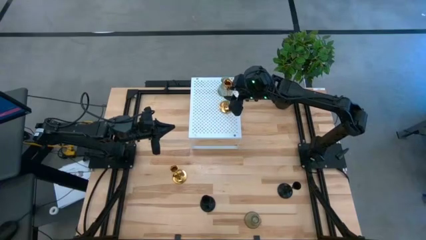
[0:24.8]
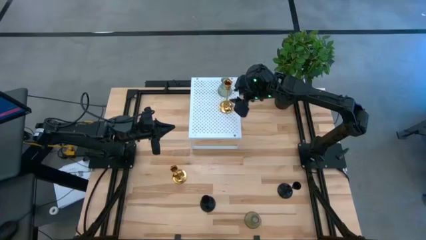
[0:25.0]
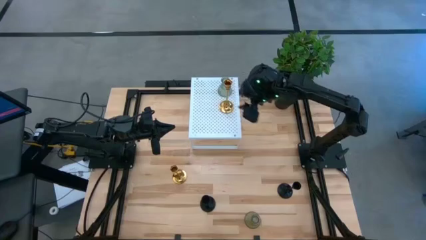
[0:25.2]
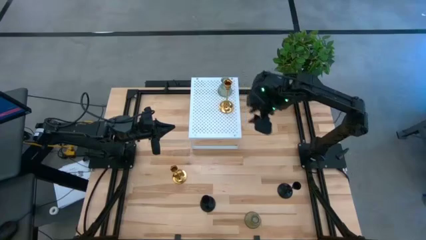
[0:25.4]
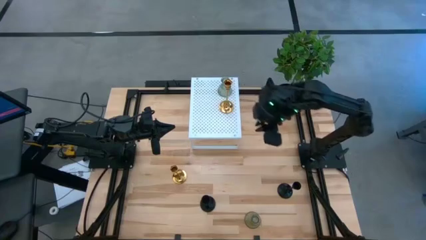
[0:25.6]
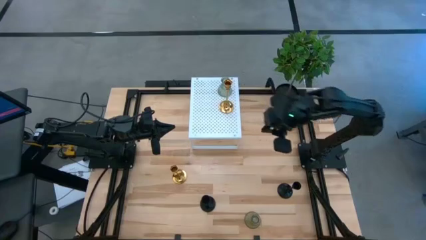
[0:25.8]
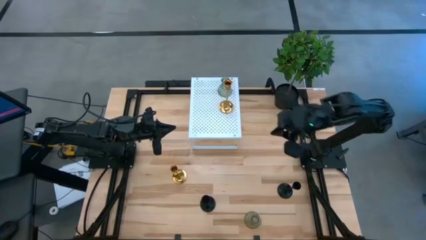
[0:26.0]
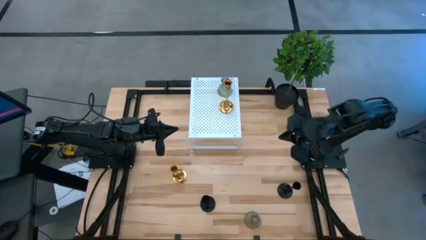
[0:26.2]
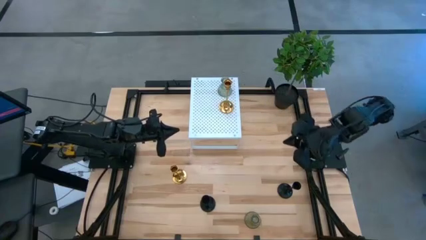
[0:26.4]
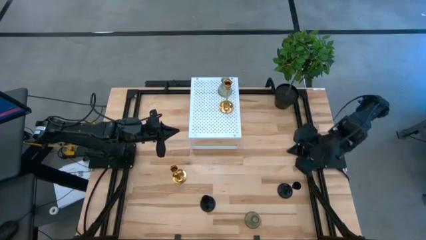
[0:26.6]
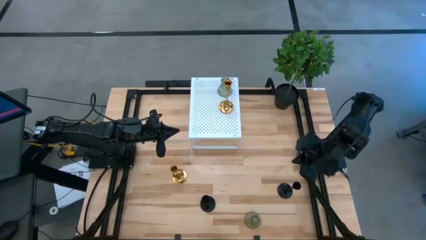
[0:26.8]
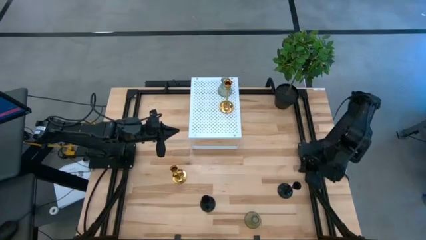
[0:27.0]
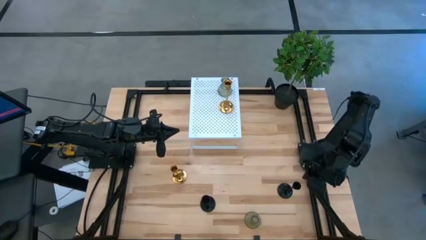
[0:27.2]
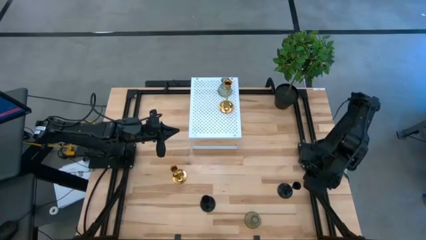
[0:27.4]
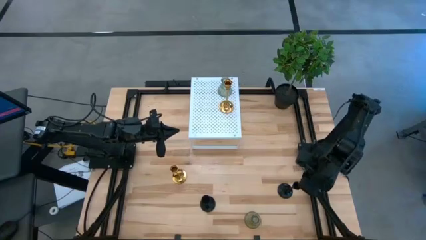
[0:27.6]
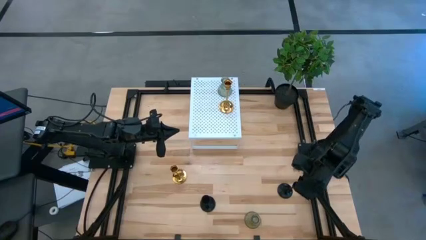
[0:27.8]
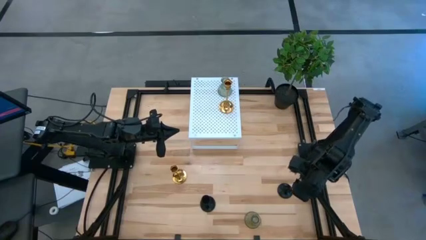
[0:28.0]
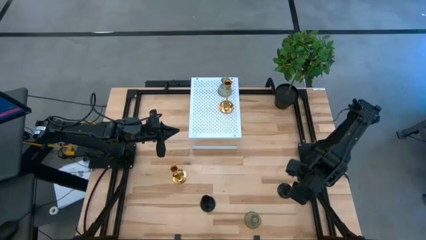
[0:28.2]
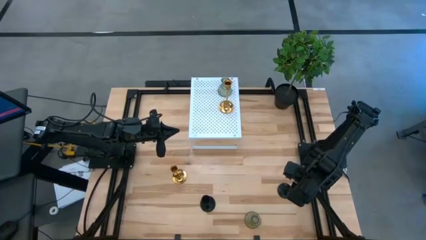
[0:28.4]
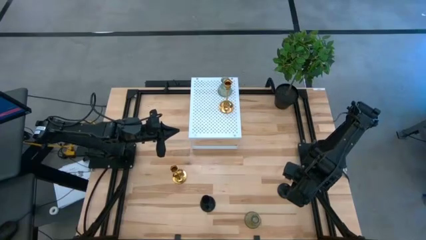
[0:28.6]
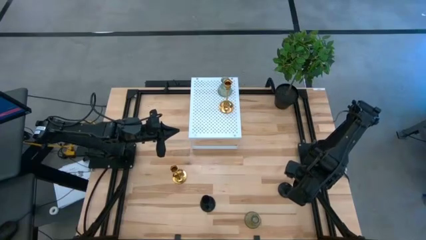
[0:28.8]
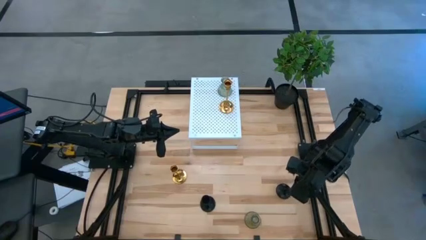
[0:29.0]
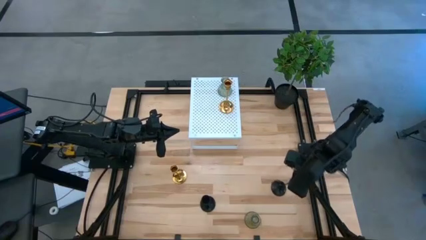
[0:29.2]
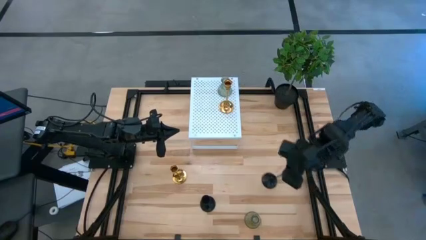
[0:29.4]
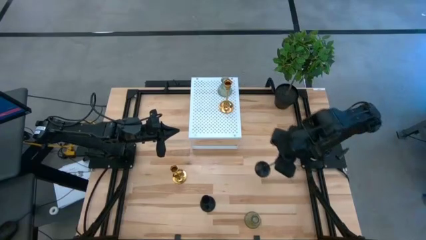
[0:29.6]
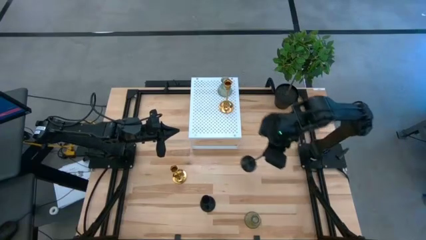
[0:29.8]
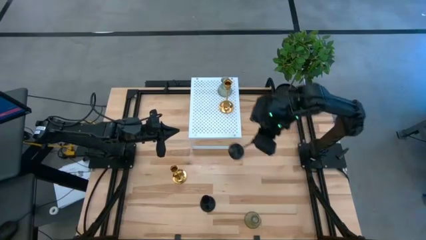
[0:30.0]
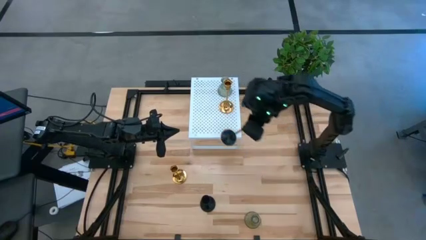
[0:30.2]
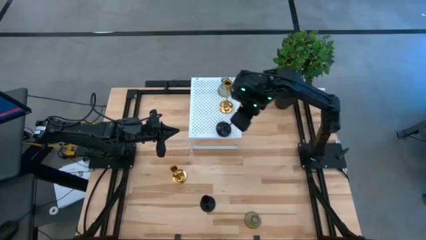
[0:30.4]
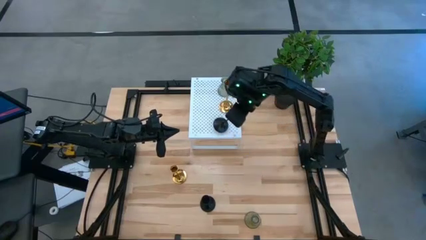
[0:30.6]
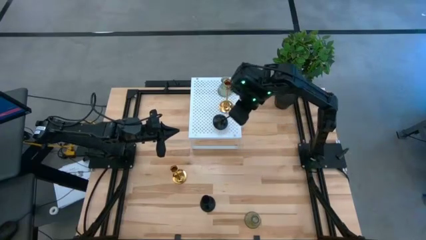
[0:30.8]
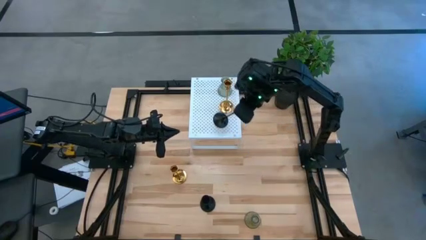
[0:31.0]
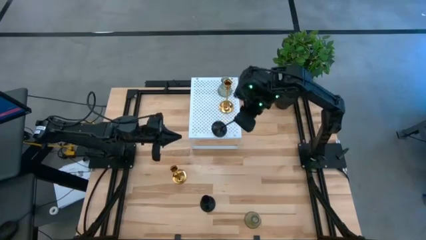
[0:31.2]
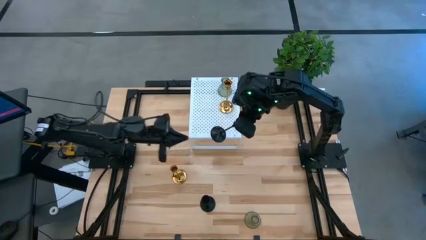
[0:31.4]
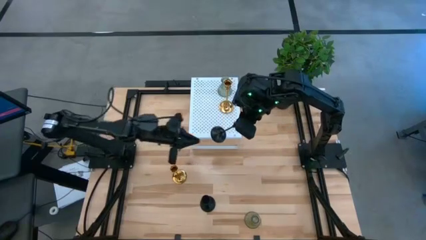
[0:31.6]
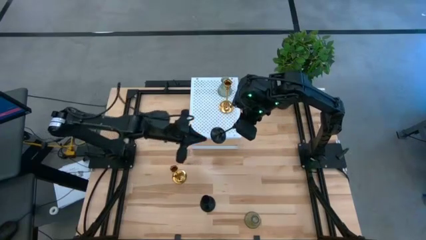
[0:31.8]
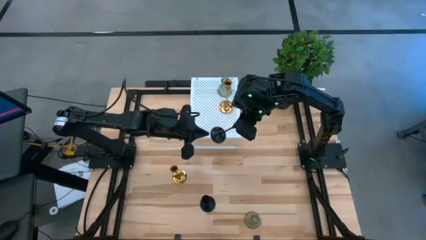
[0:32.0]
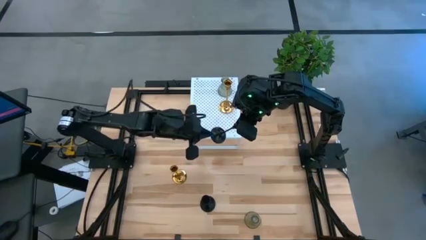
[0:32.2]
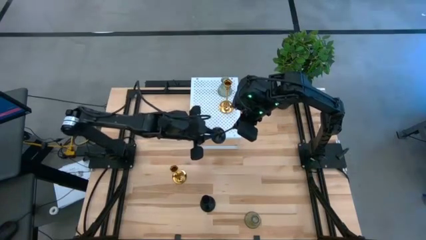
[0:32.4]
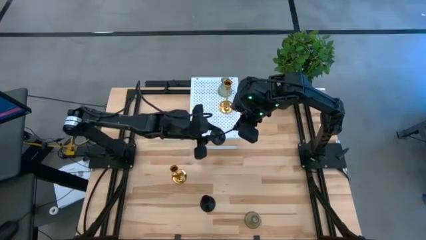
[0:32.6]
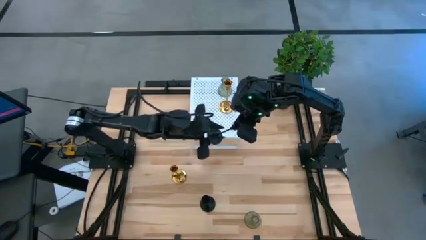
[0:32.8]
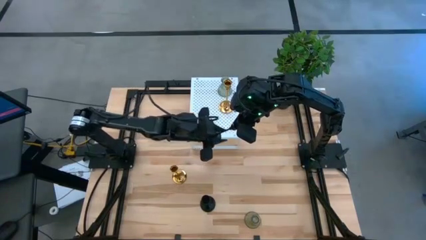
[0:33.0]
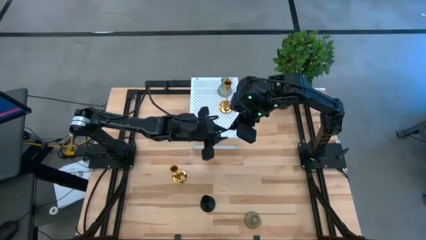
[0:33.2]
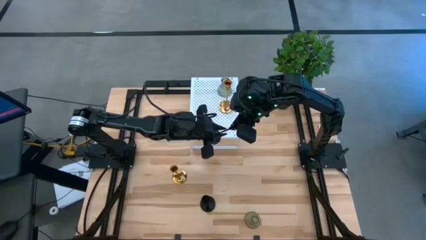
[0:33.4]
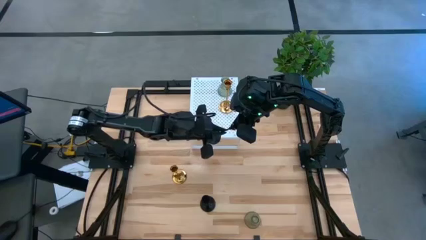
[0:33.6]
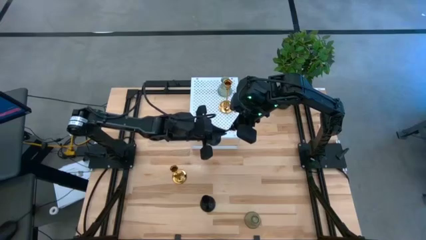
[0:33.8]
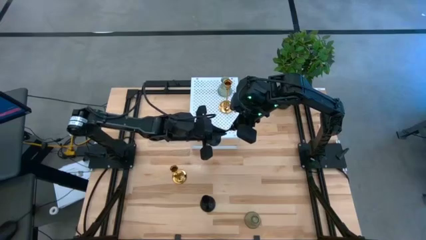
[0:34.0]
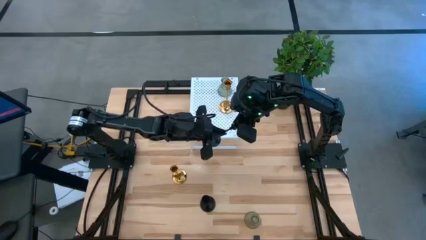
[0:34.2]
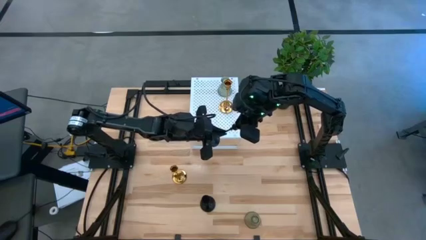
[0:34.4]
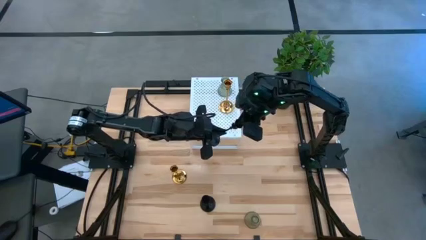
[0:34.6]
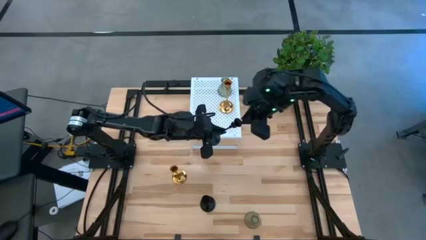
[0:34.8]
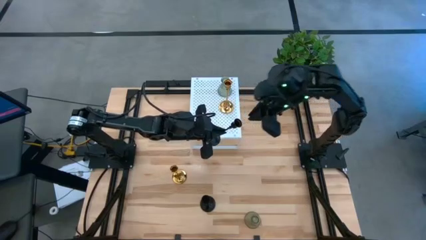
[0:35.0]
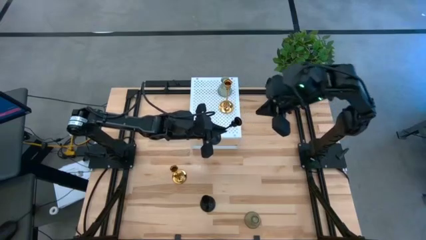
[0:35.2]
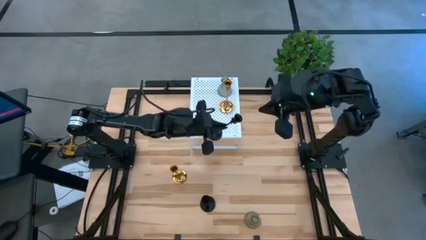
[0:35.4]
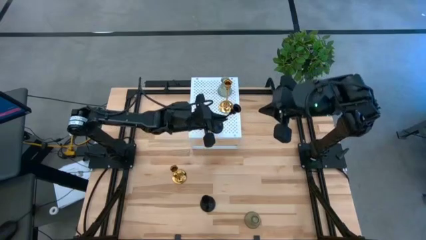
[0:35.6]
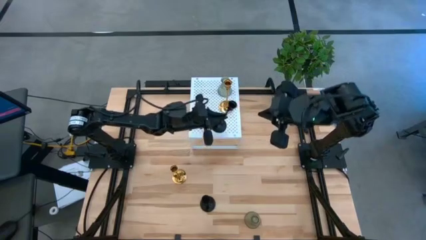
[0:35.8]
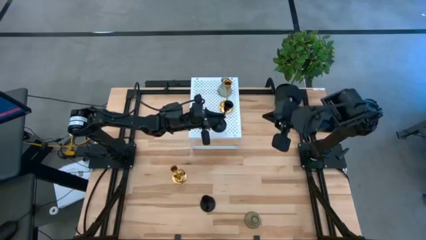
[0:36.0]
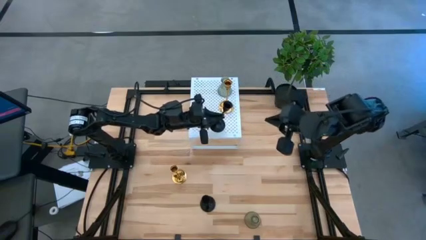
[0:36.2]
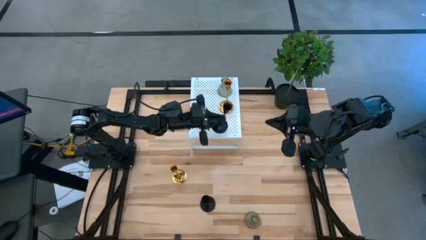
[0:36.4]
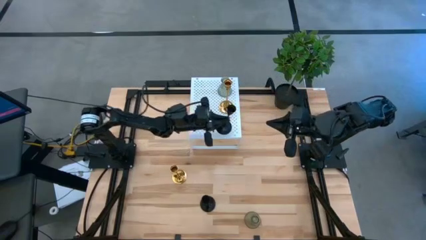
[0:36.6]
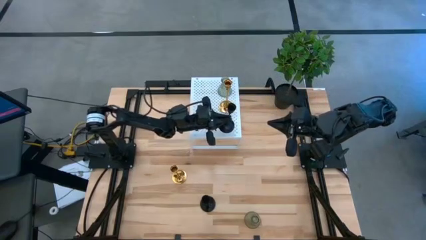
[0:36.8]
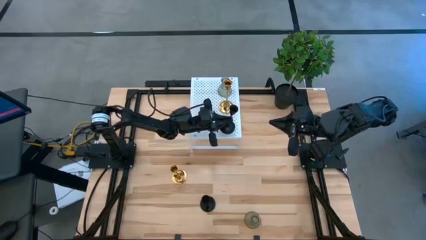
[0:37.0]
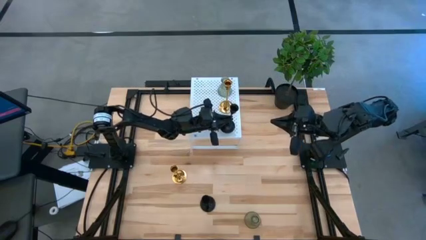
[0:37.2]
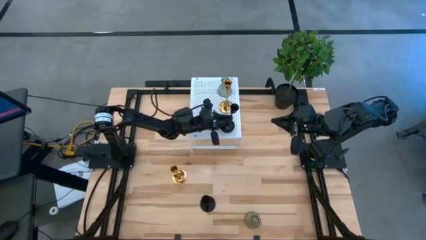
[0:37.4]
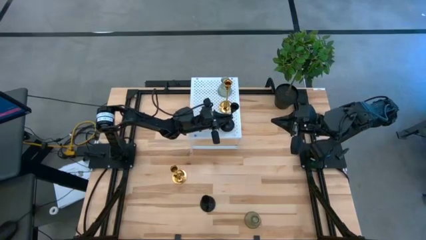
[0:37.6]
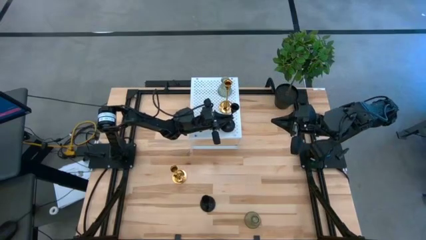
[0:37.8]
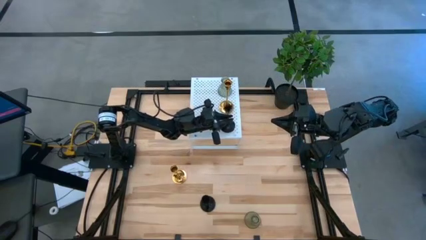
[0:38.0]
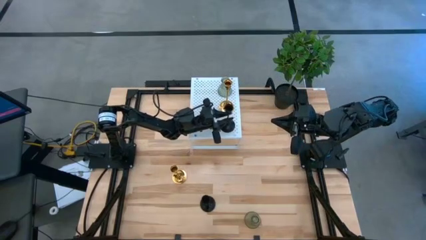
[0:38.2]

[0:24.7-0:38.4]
Task: Pick & Place candle stick holders
Put the right black candle holder on the shelf
